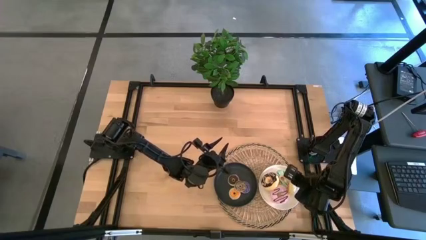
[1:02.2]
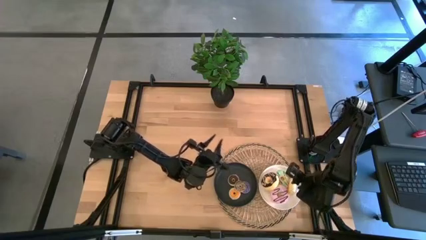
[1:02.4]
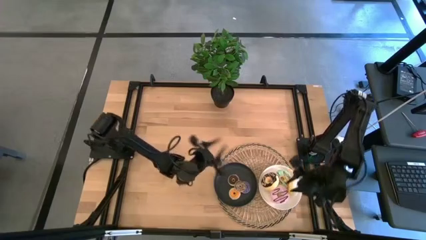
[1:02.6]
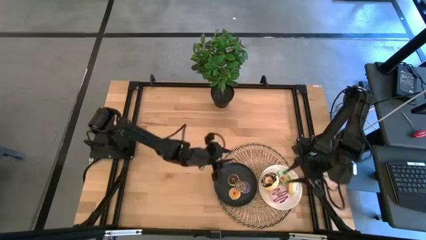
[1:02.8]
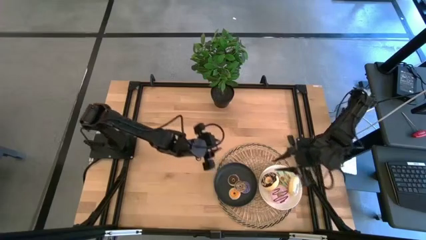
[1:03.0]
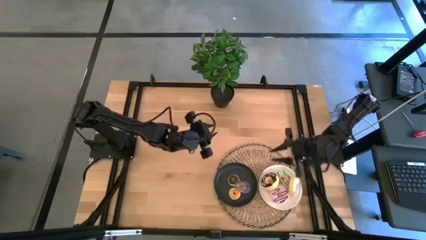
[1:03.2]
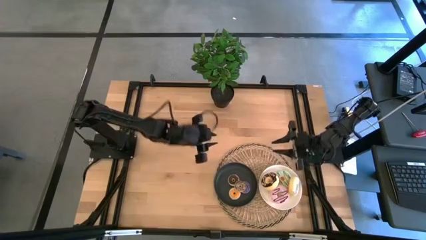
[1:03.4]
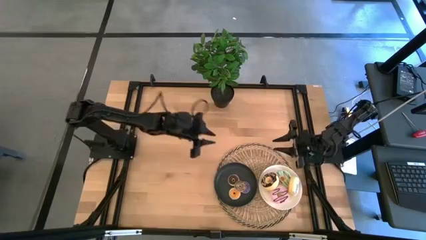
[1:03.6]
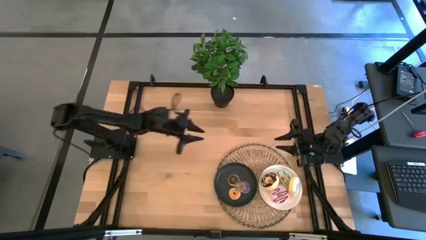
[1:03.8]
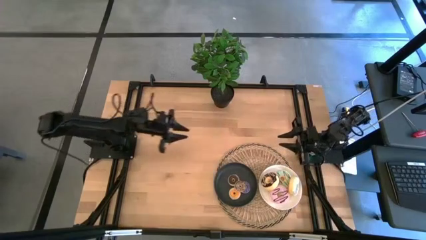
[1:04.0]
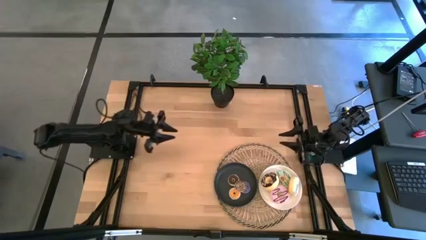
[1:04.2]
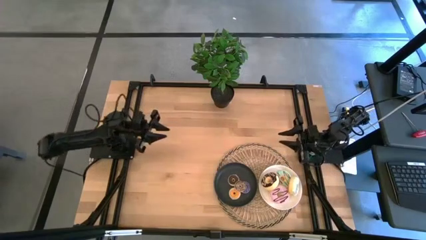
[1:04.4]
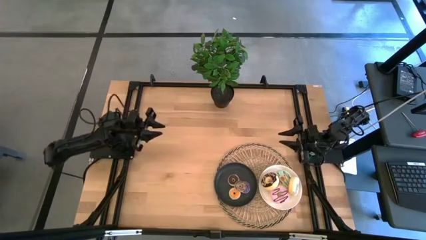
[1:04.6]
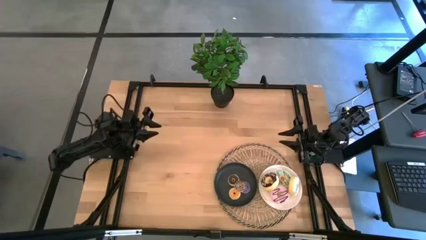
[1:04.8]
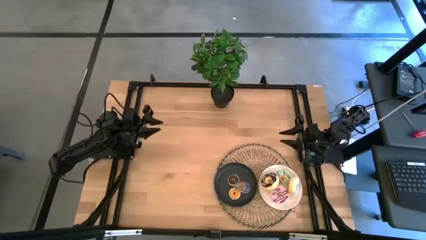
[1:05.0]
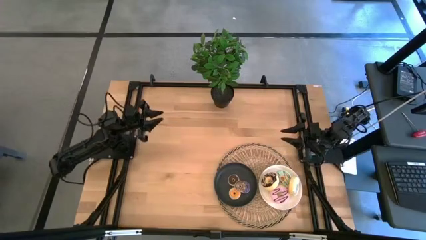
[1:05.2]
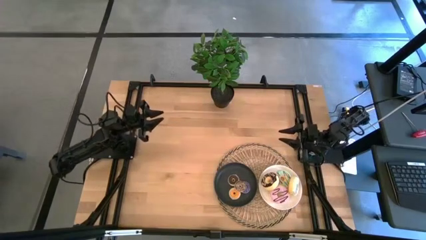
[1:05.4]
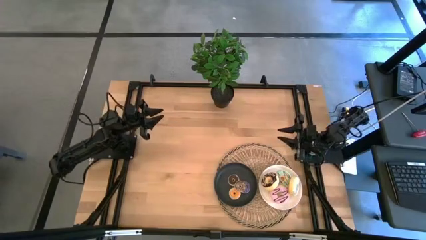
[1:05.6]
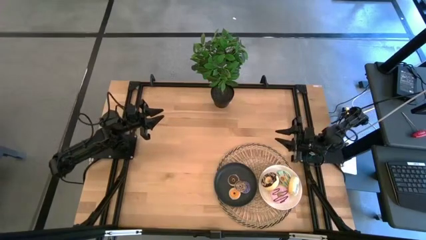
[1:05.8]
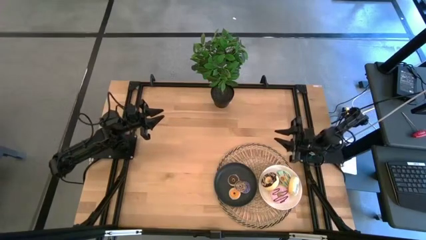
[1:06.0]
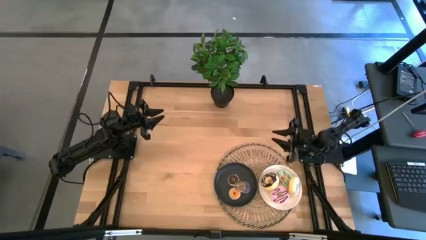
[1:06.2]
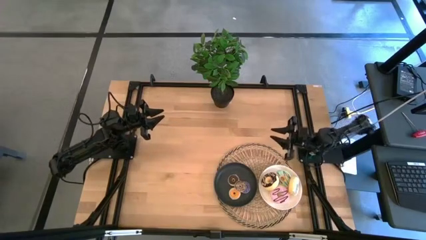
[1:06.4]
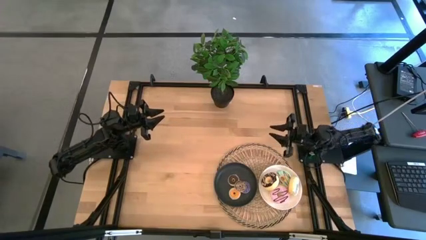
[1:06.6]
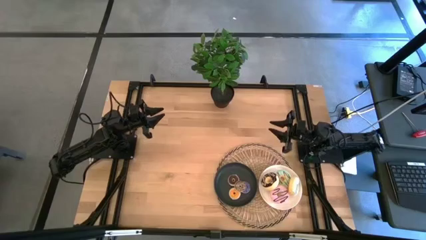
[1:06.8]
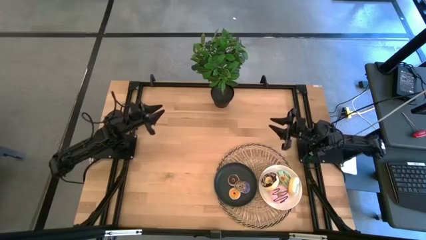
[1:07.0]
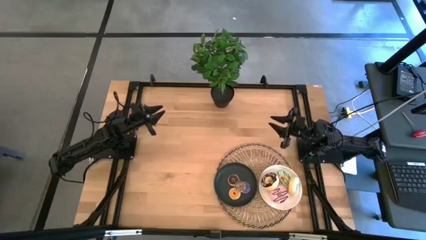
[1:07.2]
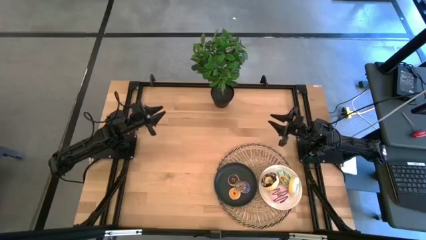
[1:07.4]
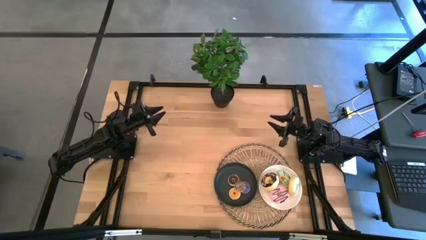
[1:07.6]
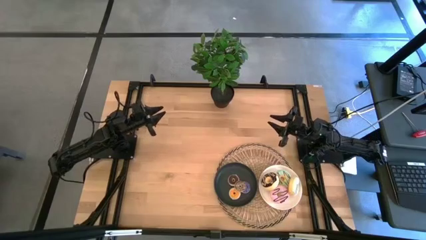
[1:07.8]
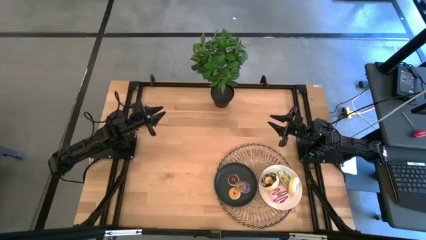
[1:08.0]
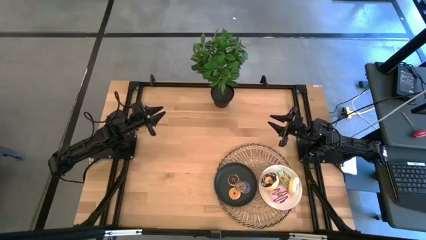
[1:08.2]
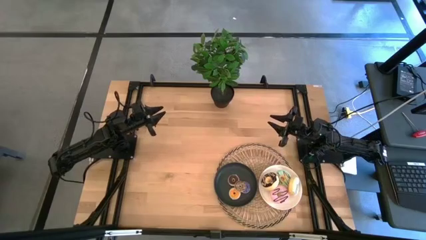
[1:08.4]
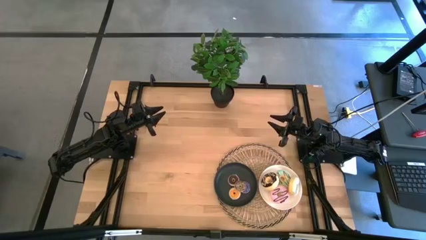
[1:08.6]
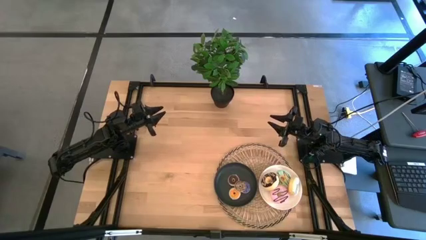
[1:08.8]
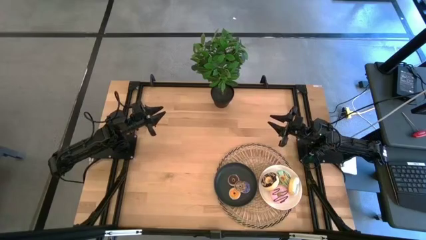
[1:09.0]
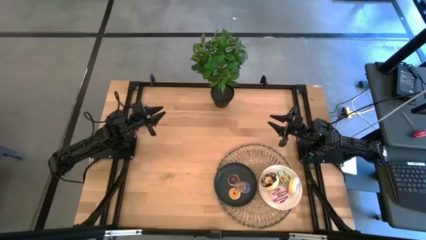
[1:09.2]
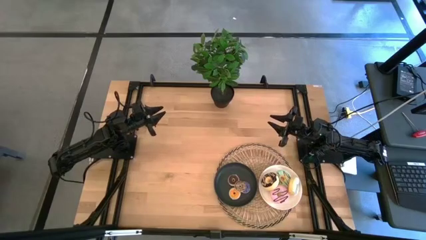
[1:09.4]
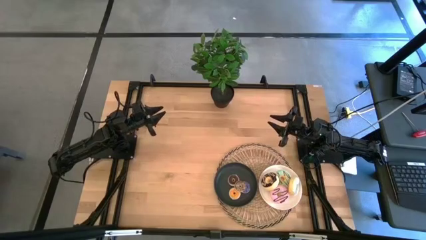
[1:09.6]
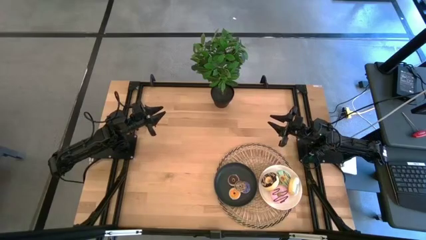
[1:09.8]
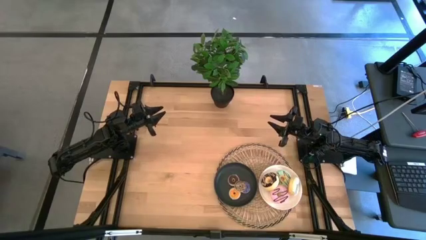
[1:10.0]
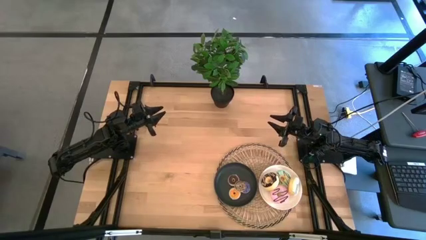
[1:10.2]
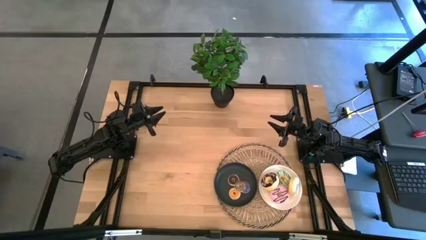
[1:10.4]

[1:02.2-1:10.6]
Task: Pick & Place donuts
Return to Home Position

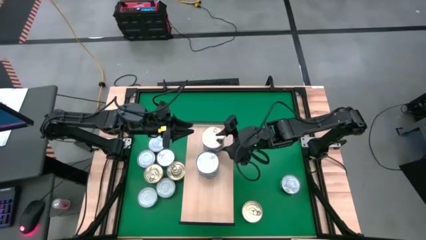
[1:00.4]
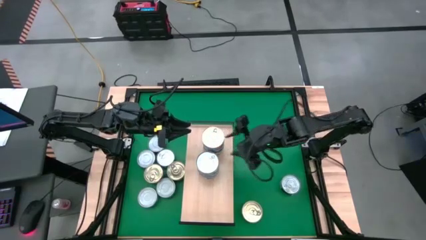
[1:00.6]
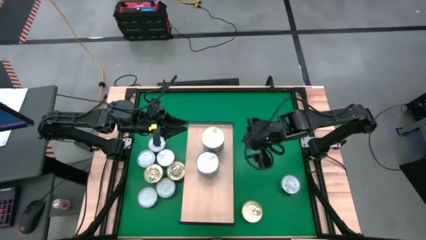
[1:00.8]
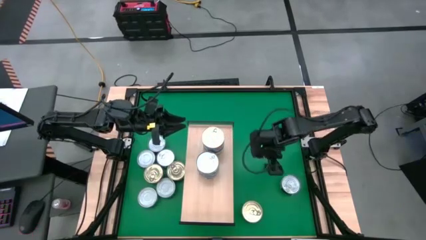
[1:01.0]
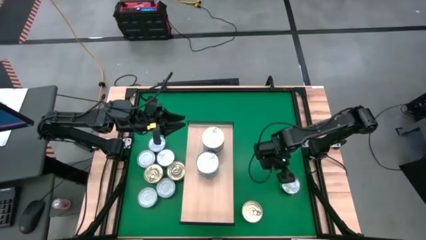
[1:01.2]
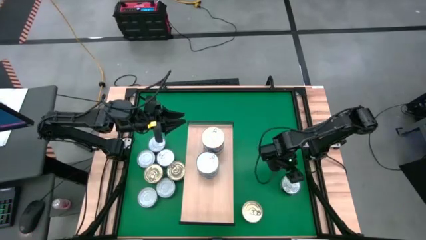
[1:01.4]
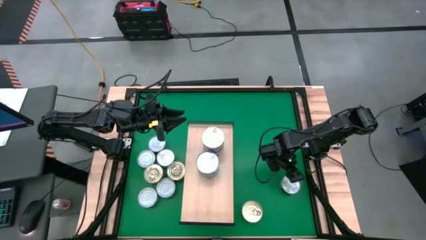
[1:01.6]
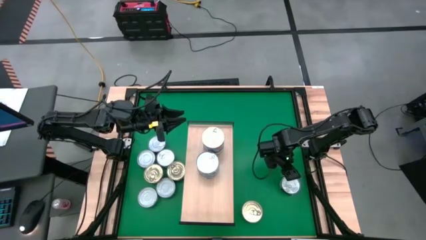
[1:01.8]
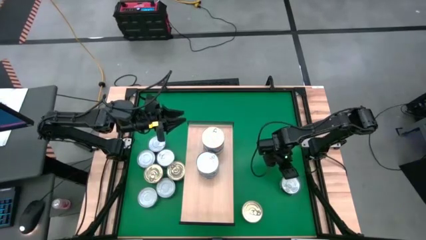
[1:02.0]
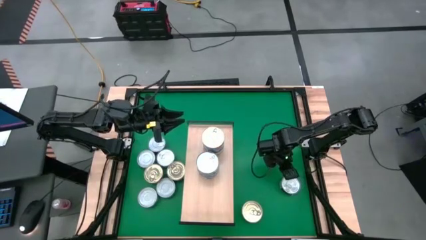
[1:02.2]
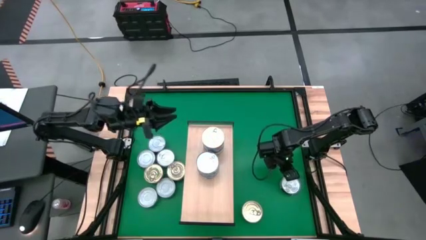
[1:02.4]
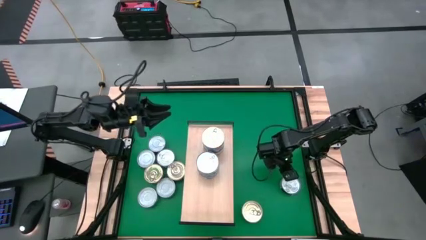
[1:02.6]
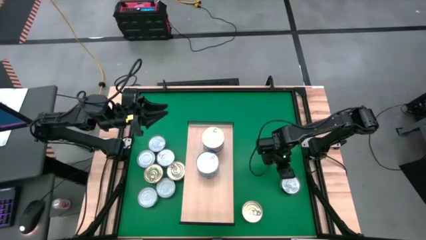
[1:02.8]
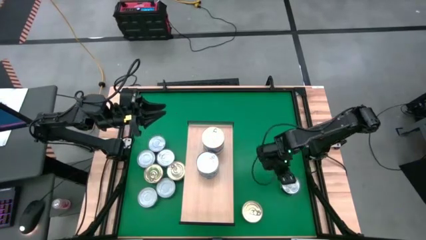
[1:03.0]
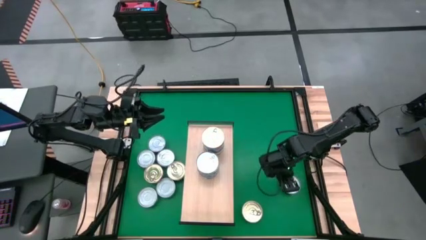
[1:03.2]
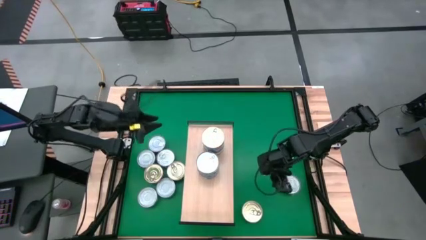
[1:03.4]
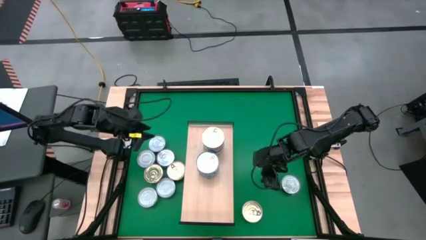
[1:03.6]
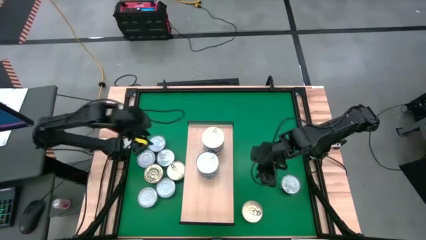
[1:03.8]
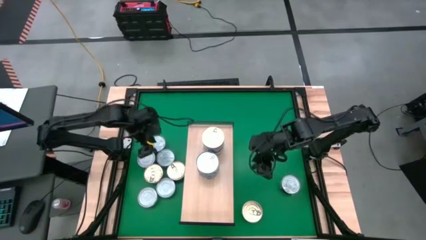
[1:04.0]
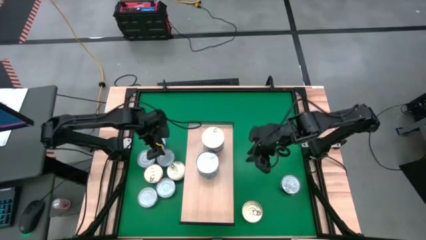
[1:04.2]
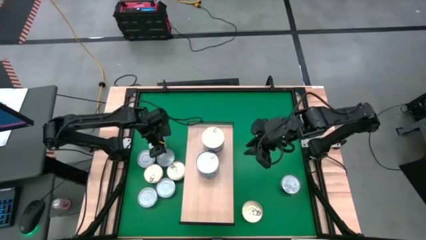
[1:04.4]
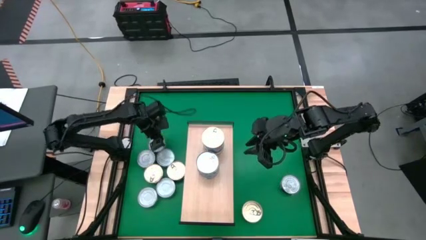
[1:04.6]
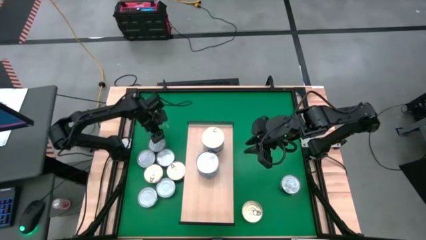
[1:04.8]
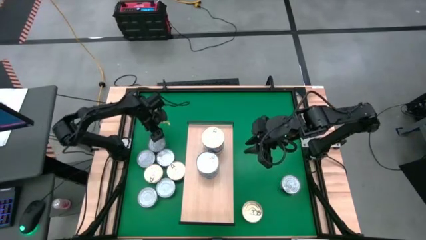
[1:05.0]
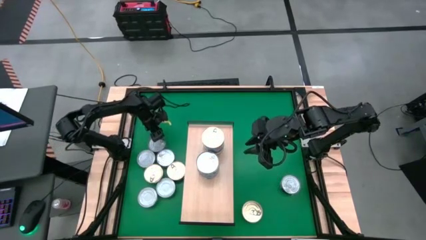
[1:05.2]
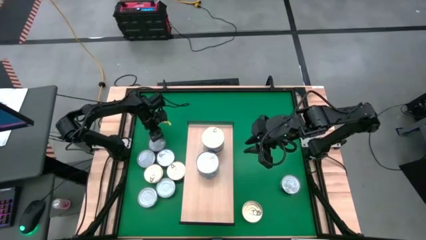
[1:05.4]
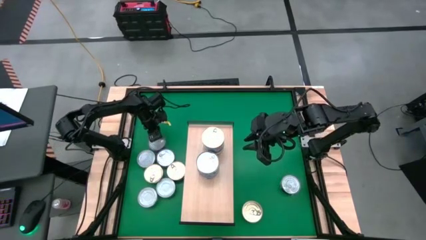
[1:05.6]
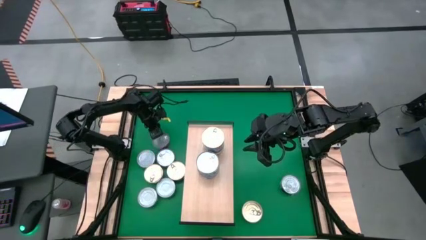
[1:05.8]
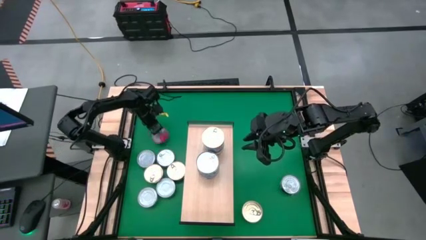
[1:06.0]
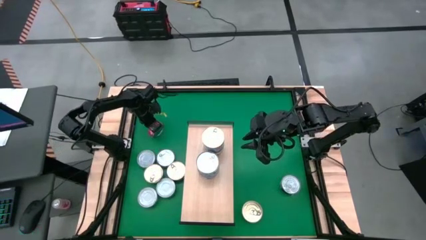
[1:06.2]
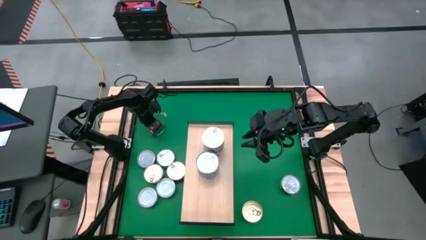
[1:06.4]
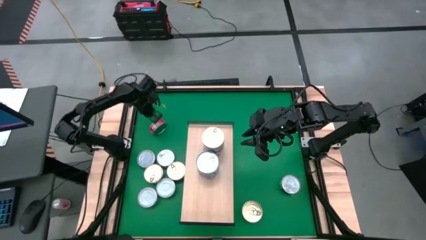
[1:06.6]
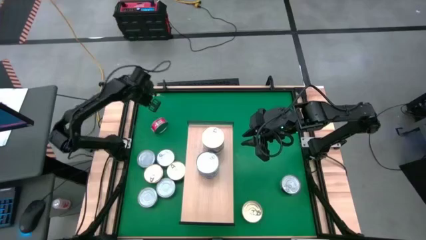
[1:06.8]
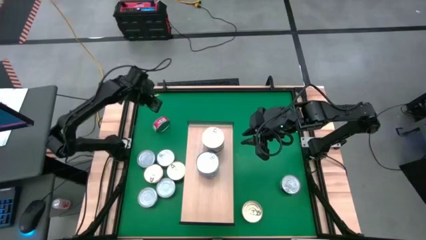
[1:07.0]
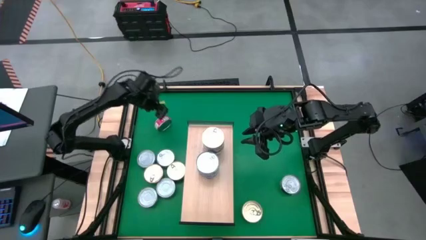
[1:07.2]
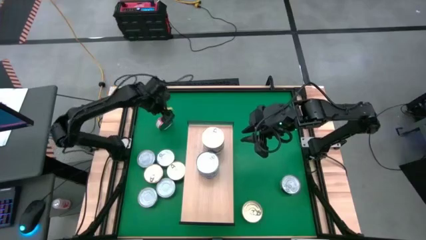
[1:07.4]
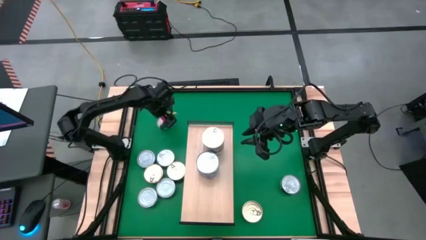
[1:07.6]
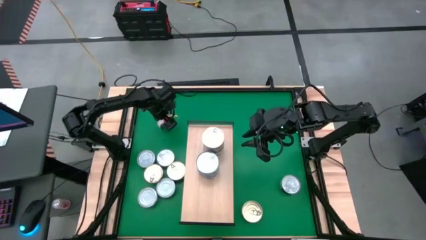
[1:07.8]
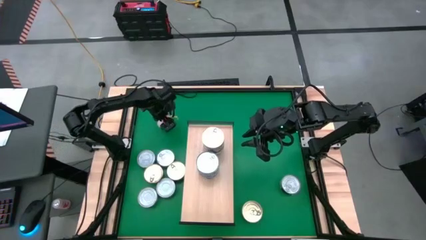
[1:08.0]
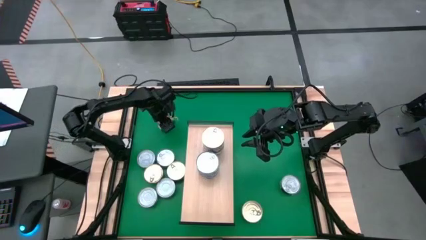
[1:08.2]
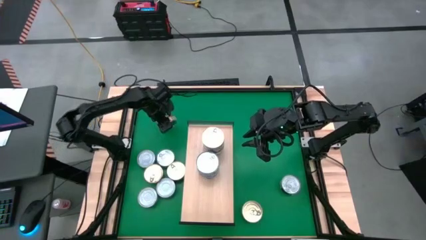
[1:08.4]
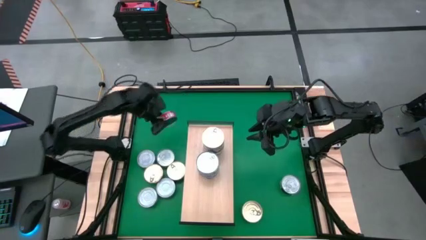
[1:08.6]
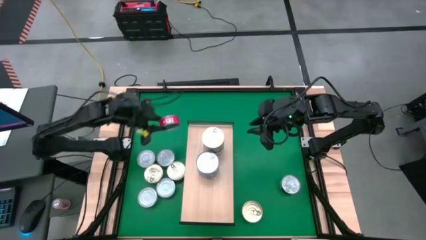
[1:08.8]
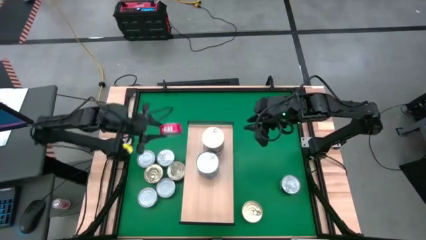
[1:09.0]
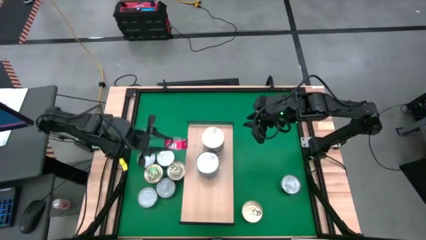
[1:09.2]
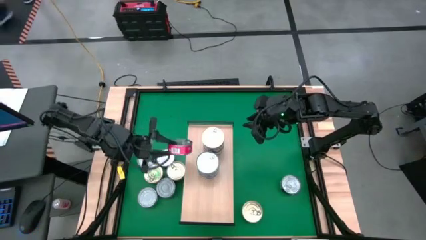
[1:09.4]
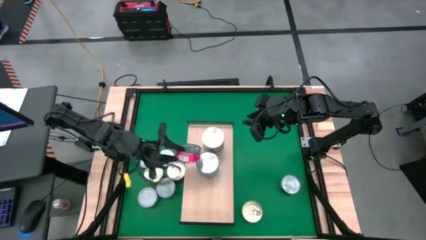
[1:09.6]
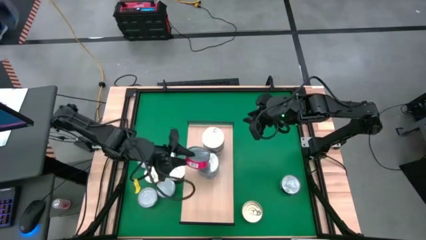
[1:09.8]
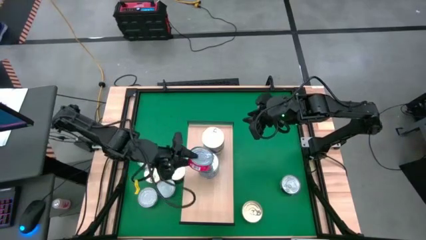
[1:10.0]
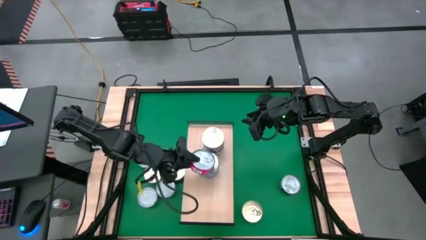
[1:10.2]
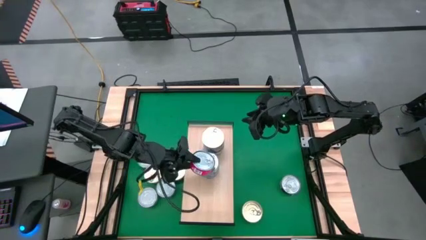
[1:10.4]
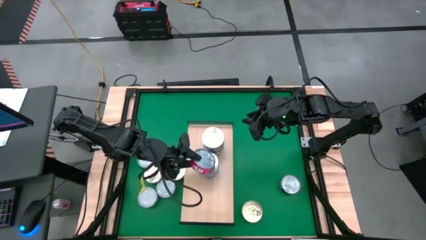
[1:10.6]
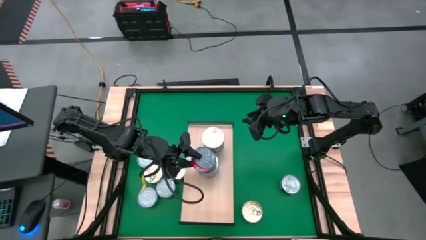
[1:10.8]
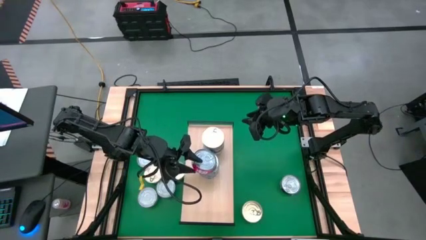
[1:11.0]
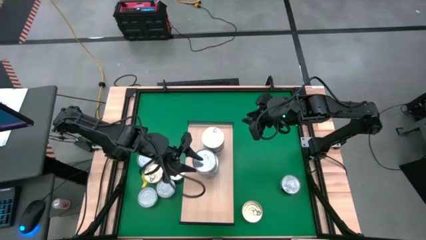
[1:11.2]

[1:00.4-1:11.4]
Task: Stack canned seafood by type on shelf
Stack the red tuna can on top of the green tuna can on the shelf
